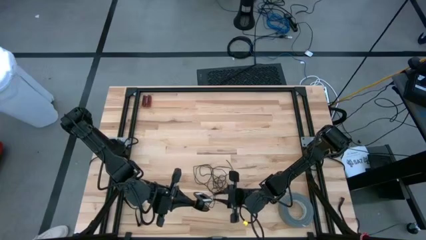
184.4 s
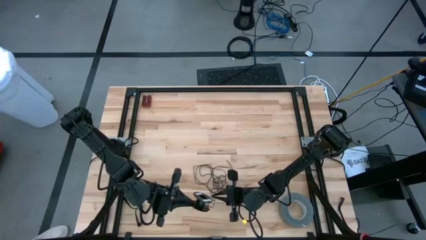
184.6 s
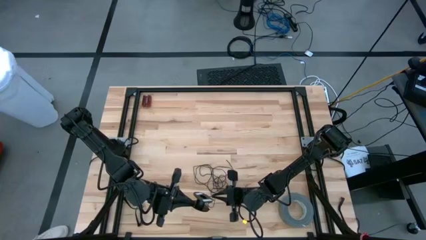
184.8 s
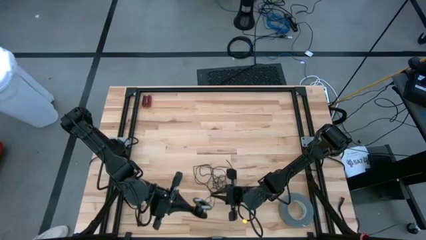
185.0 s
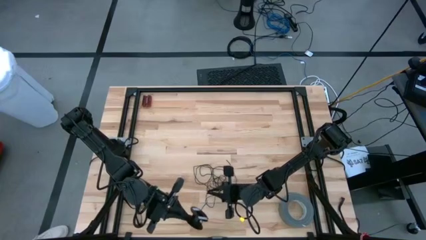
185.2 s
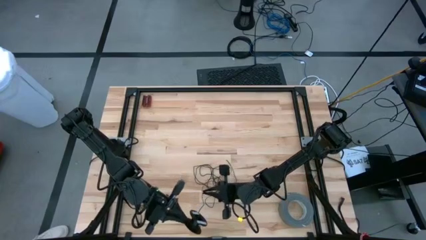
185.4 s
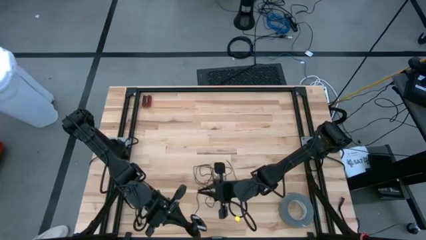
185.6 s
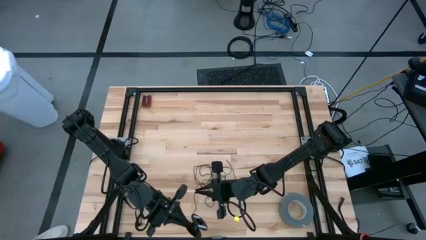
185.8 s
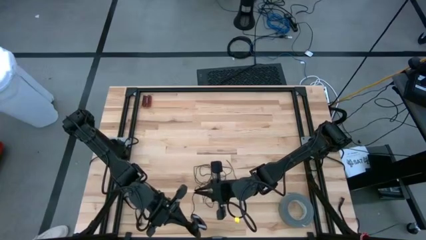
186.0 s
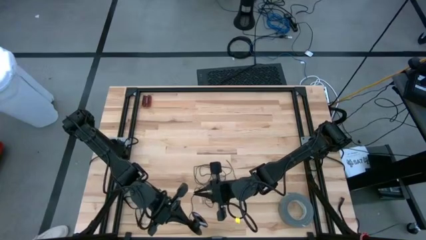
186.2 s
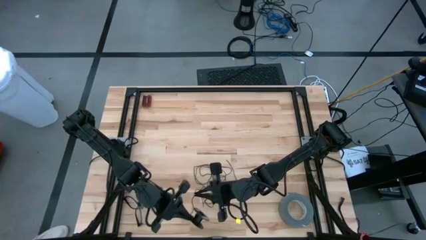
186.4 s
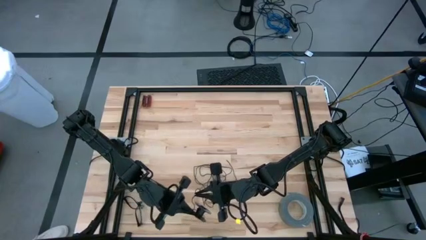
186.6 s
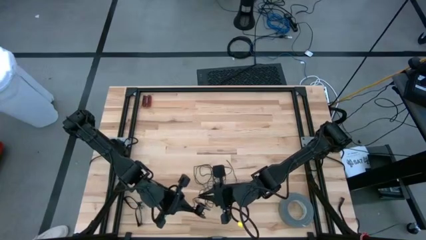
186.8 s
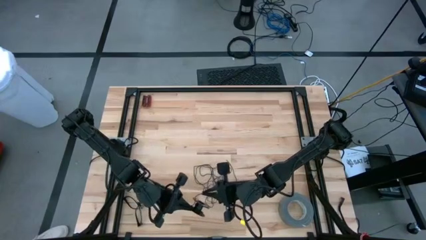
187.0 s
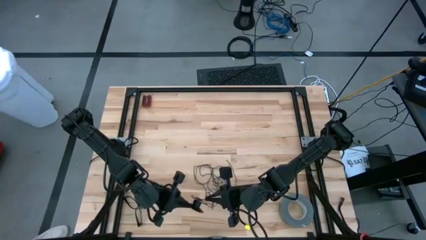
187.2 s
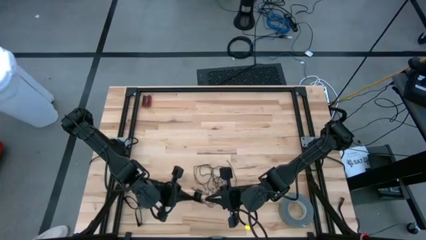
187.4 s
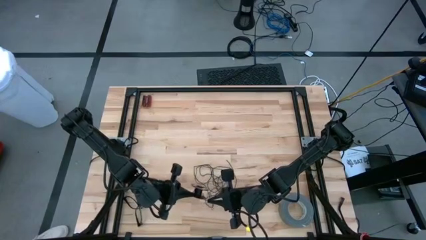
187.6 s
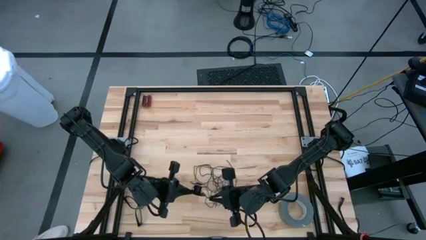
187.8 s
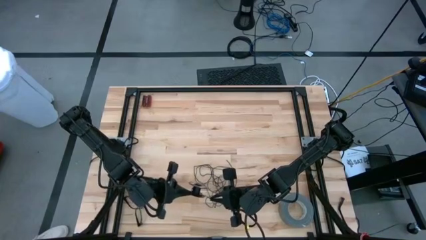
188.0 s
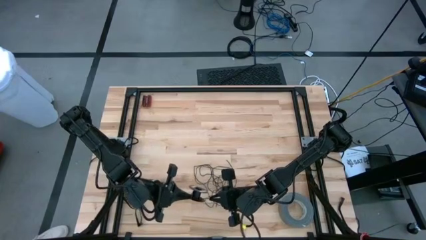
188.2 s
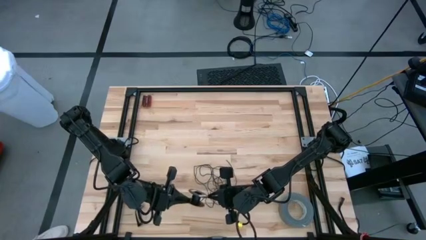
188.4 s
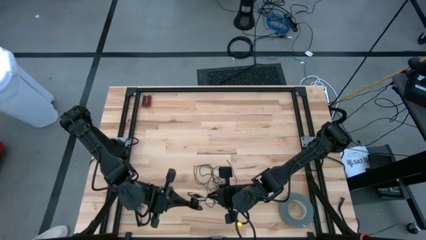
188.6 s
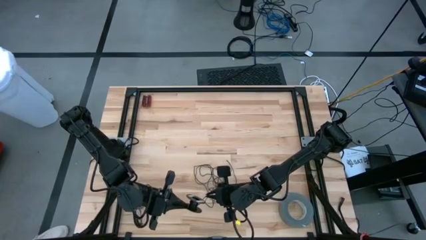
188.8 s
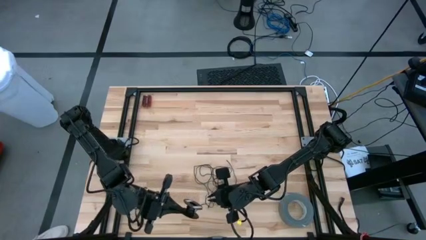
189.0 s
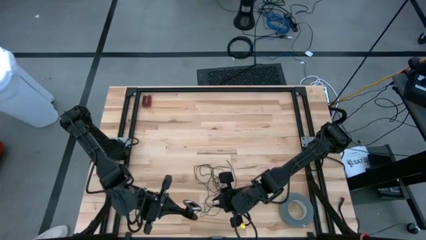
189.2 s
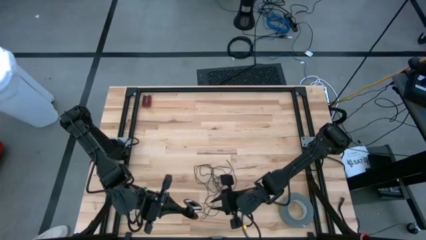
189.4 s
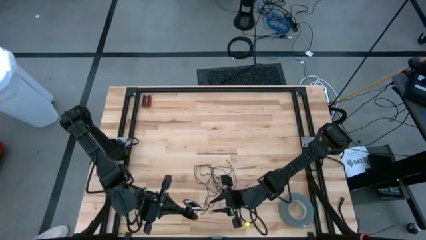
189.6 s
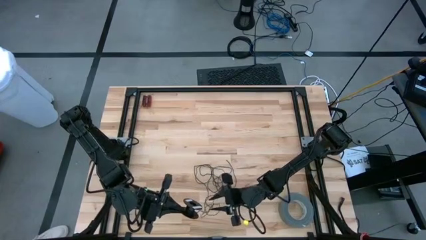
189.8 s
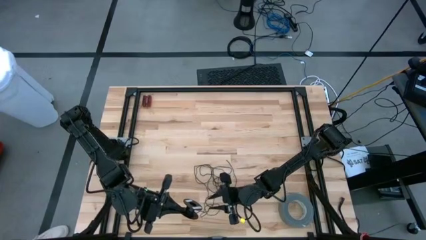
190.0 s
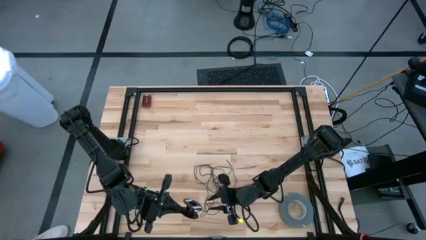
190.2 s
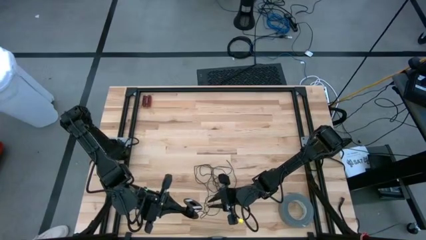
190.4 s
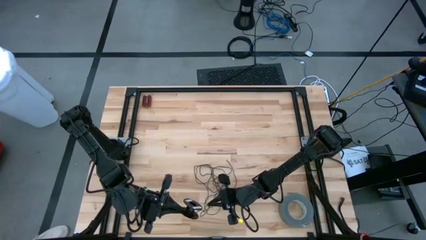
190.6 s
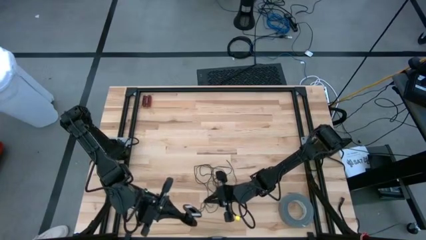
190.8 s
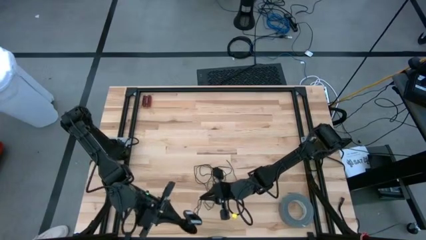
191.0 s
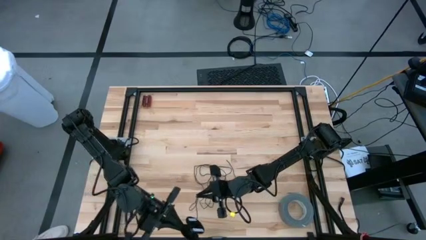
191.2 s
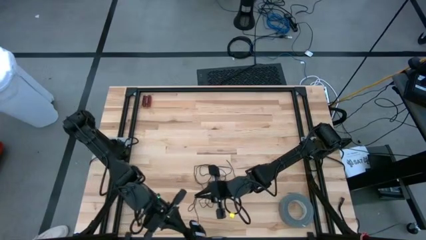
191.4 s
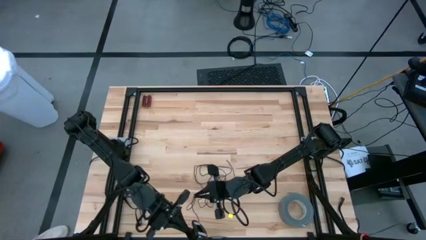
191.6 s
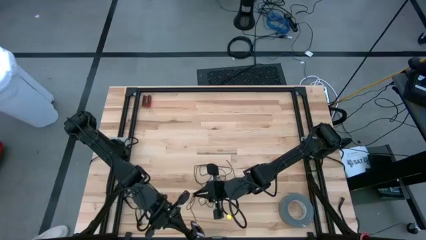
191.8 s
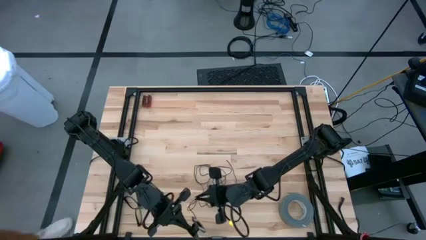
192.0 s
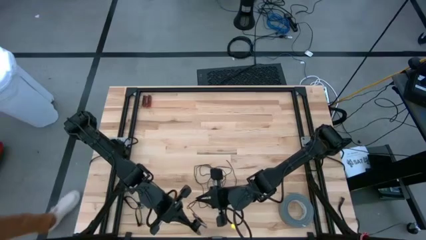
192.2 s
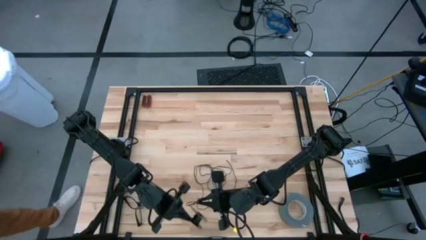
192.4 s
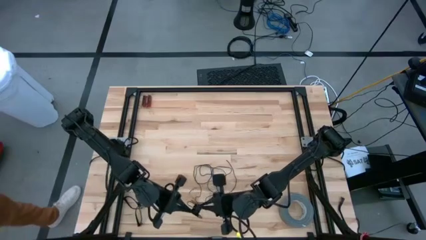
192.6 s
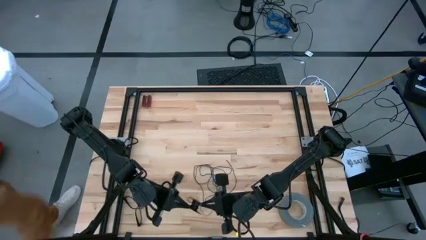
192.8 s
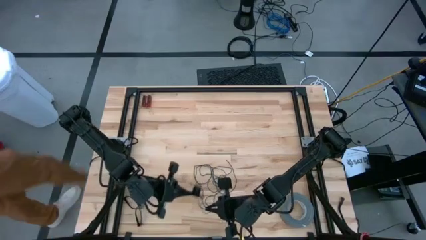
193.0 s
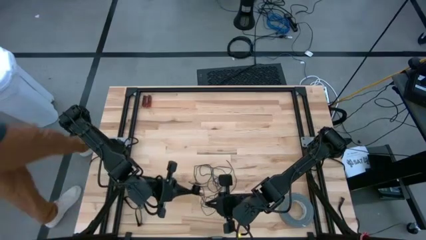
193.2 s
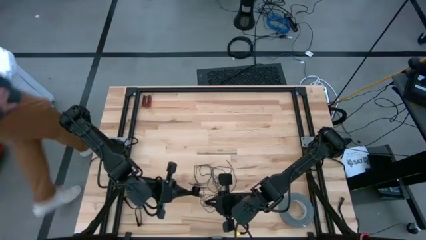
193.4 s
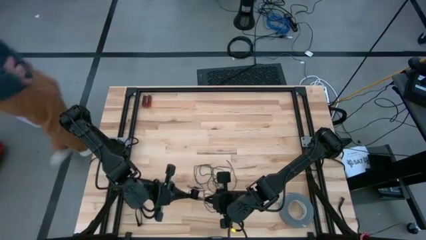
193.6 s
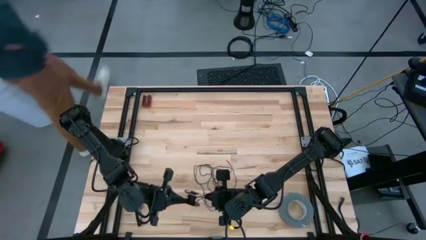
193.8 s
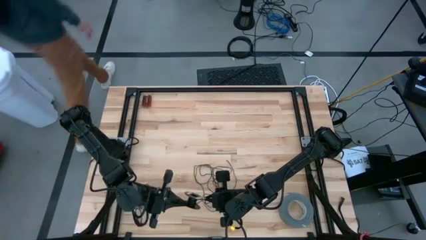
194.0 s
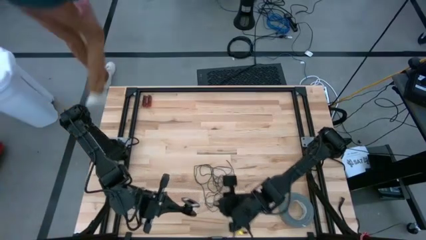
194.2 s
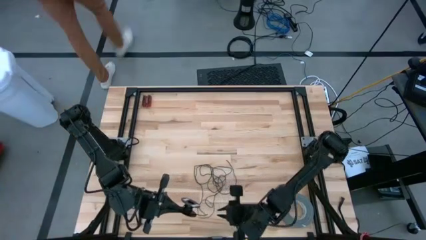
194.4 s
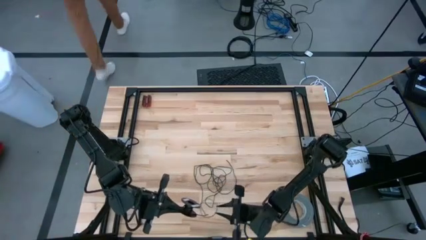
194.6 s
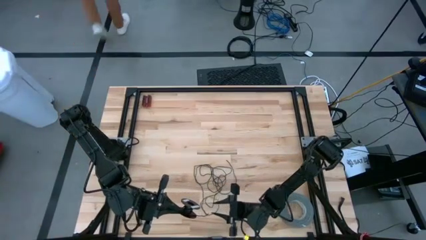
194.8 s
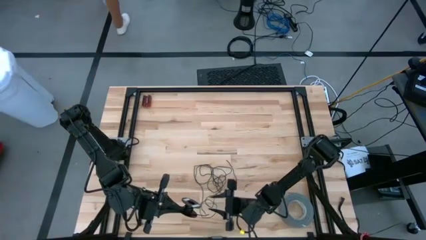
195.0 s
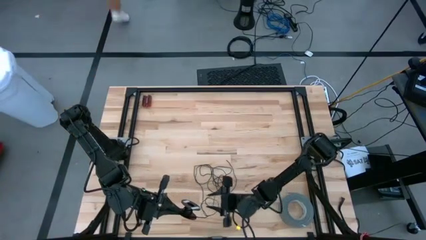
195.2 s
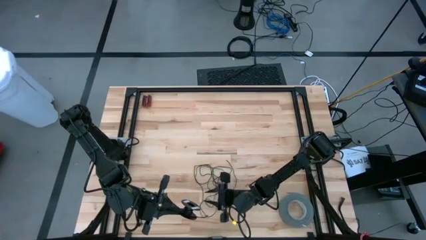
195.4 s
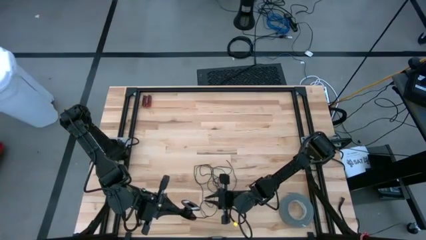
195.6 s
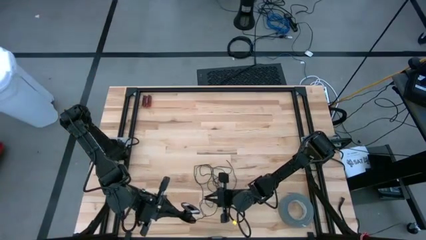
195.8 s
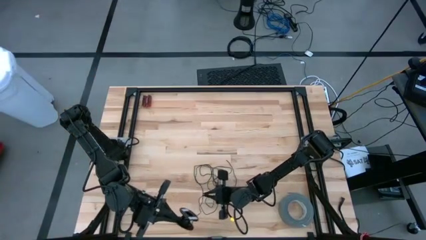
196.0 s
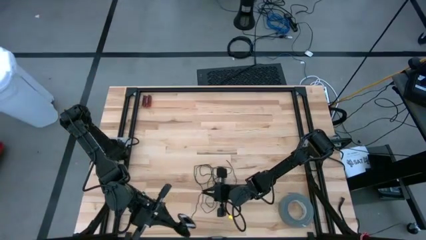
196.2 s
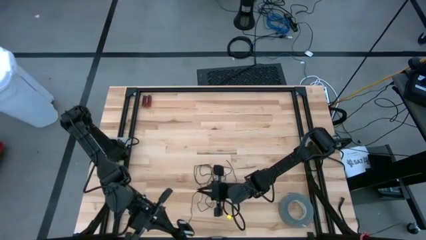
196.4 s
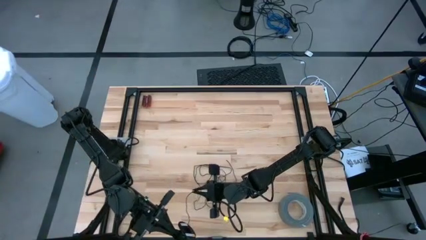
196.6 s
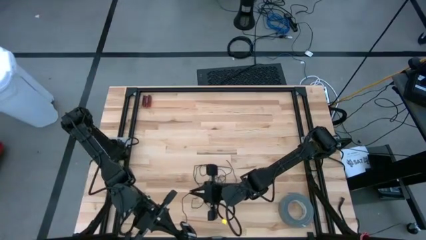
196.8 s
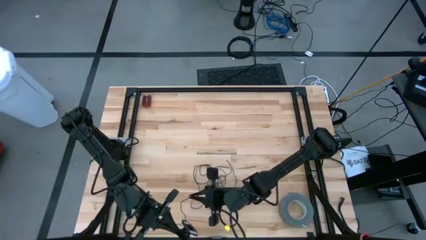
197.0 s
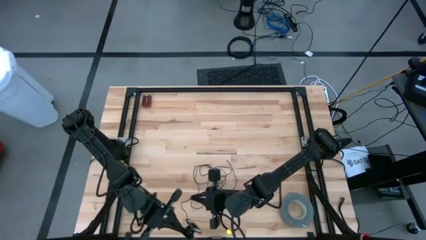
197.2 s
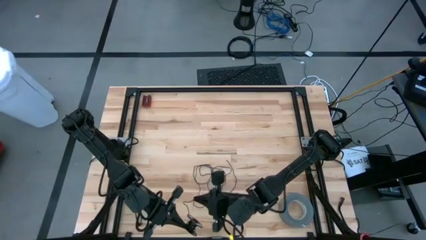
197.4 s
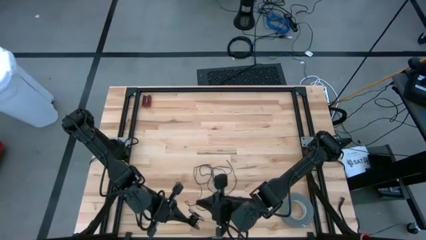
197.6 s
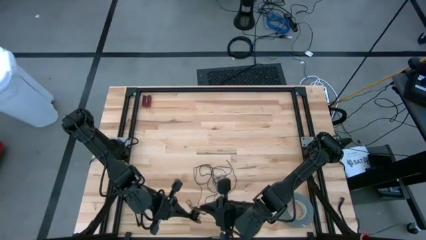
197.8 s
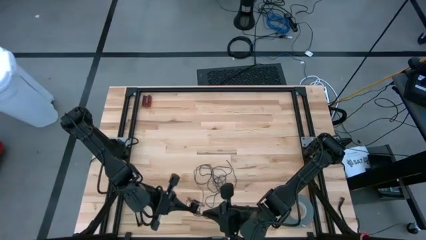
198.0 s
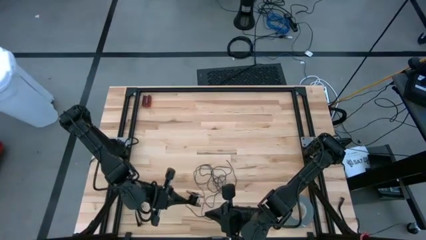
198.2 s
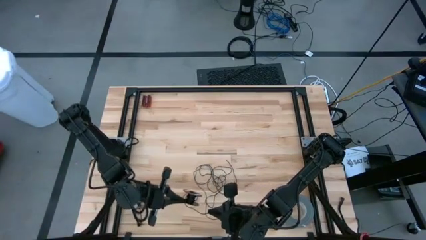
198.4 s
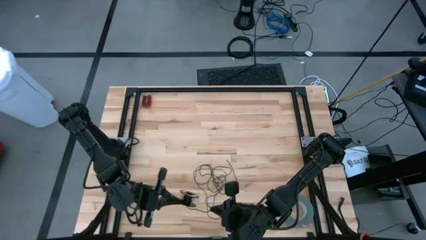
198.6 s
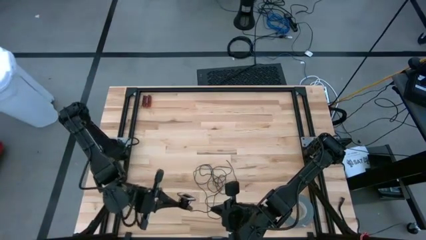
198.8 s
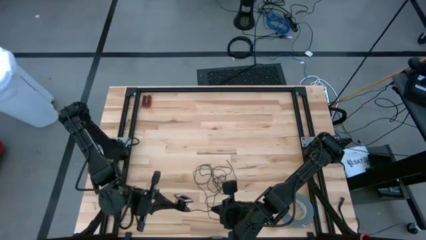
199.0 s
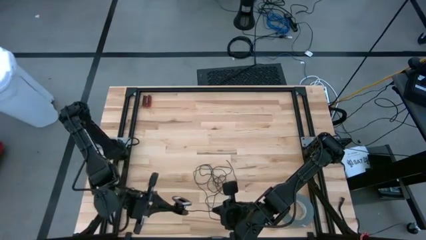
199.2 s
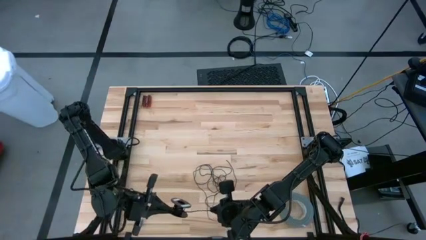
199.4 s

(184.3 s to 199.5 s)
Task: Coil cords
Coil the black wire on the spool
